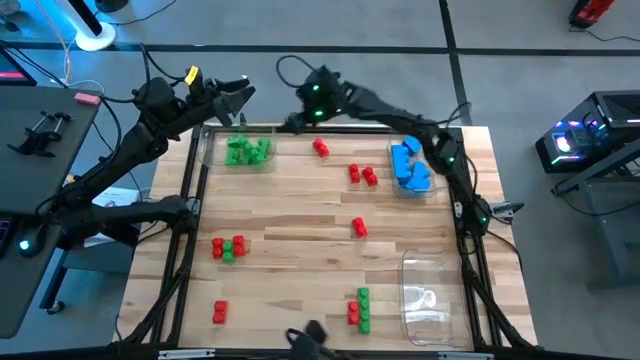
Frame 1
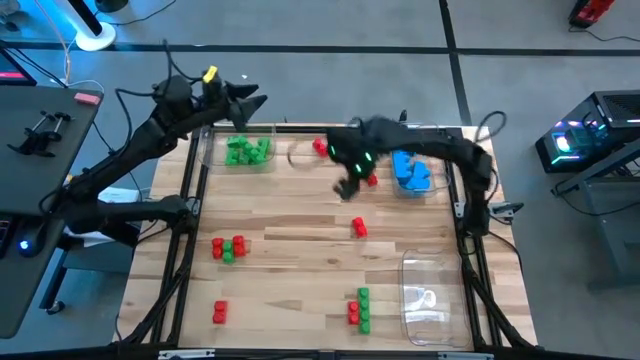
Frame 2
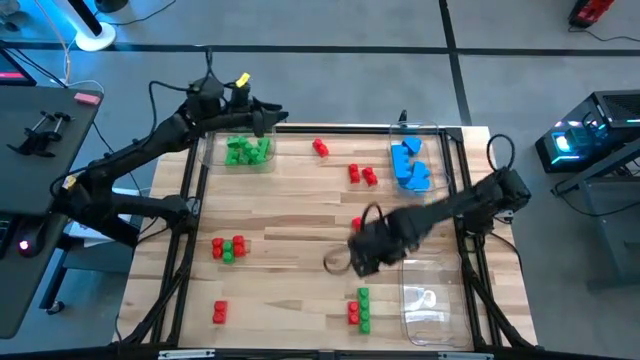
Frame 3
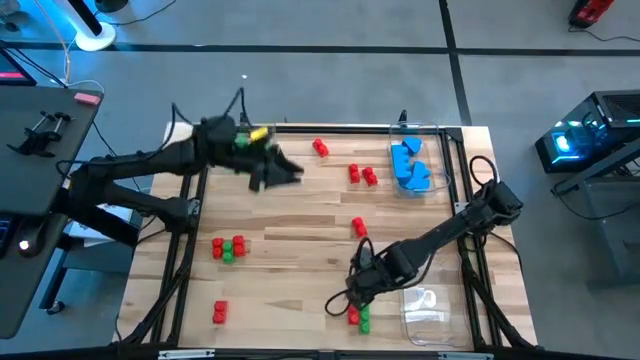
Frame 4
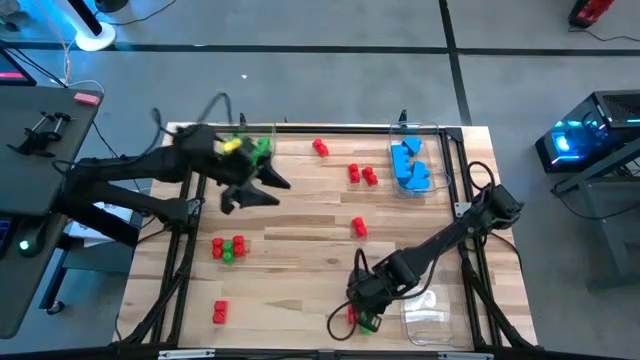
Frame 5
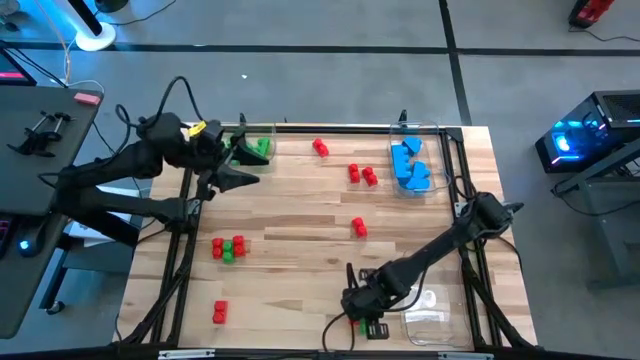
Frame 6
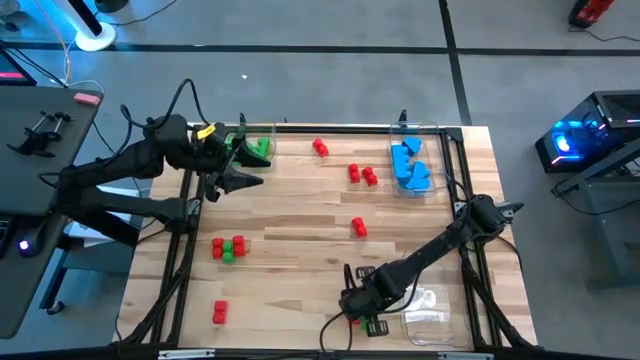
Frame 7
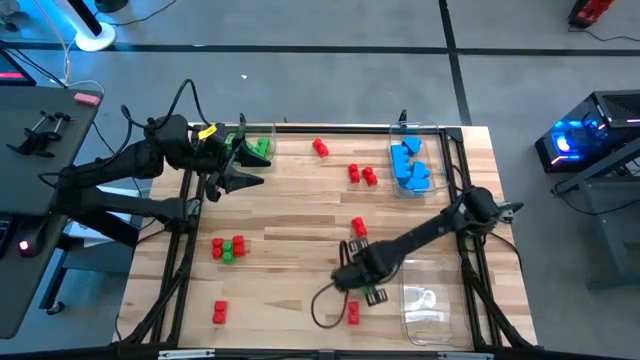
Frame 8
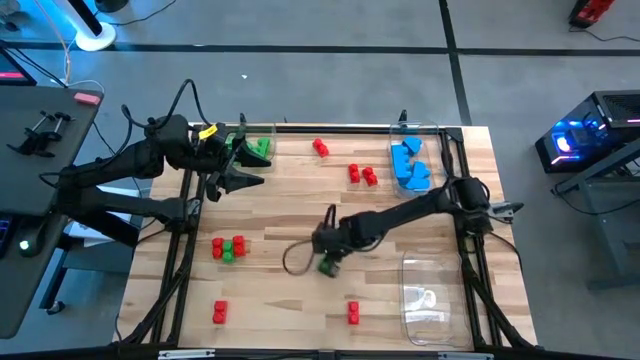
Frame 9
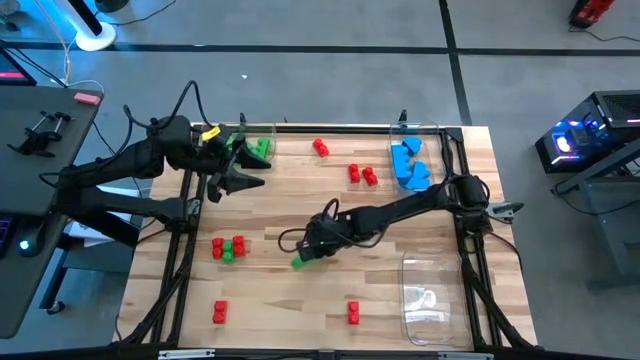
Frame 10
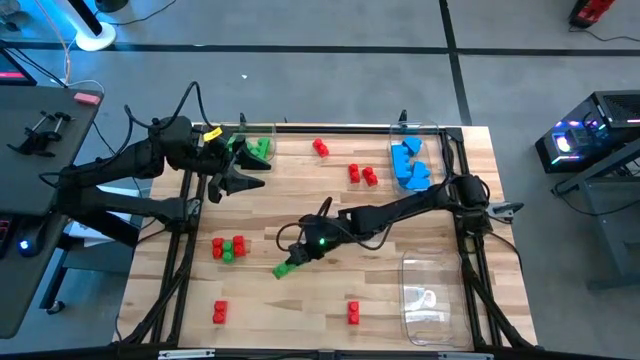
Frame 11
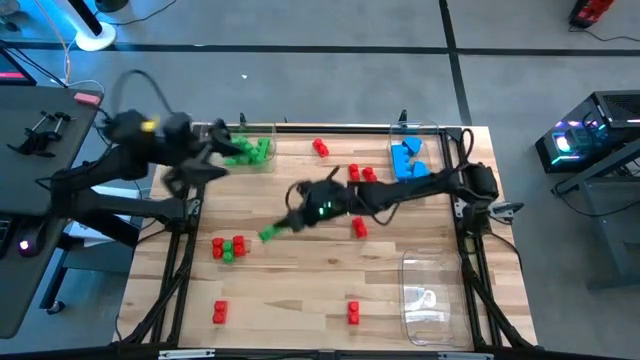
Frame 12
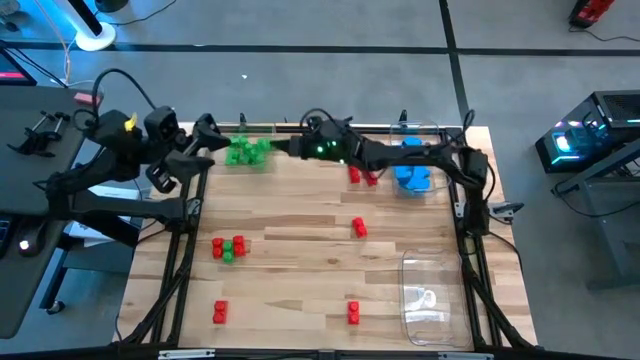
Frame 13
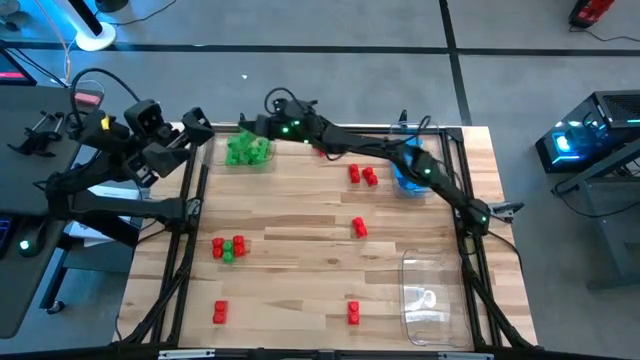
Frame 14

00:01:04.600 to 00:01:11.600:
Task: Sort blocks
Put the green game piece into the top left transparent bin

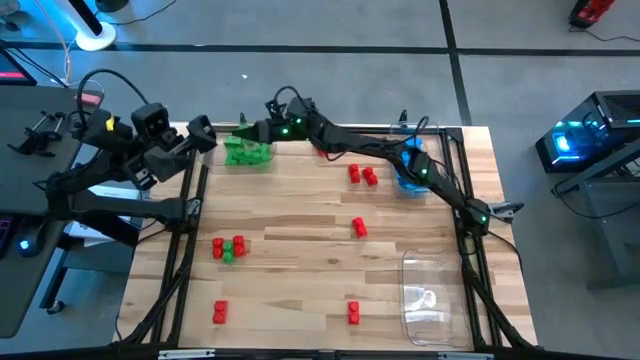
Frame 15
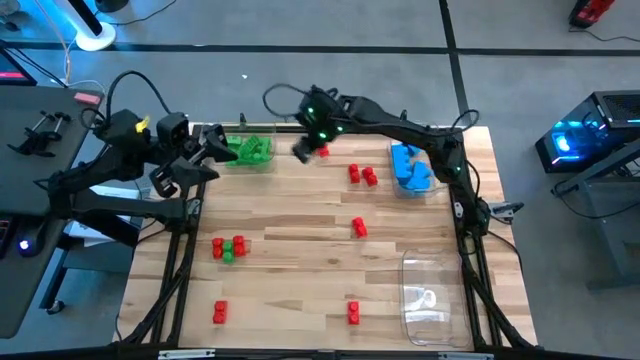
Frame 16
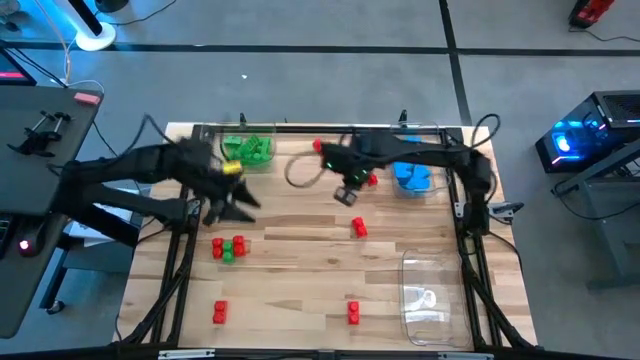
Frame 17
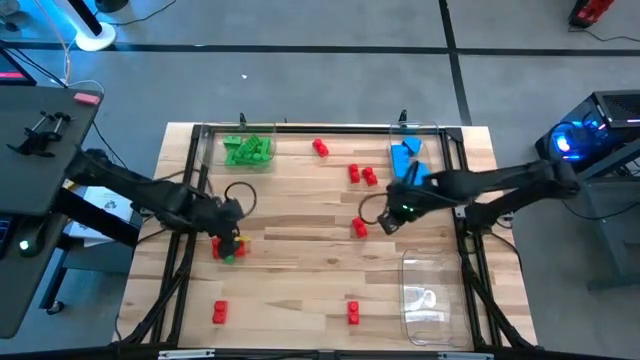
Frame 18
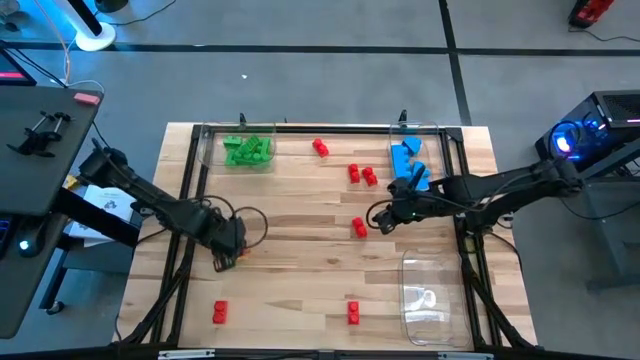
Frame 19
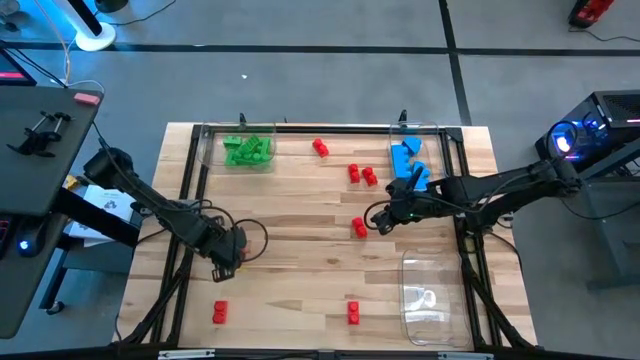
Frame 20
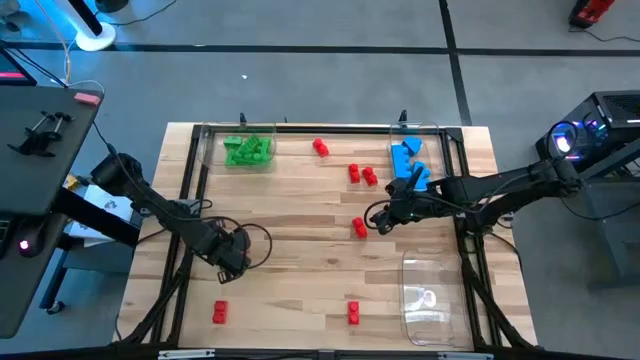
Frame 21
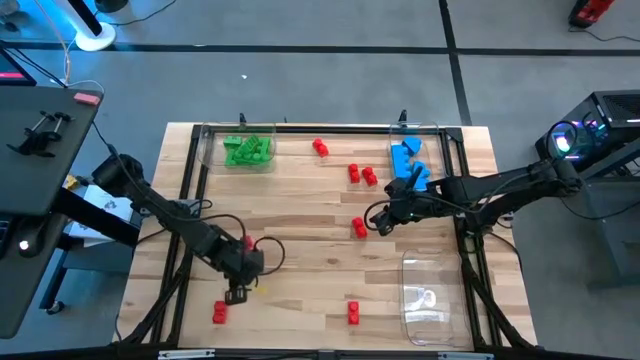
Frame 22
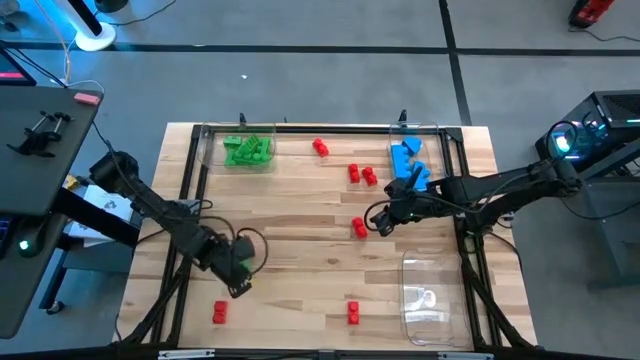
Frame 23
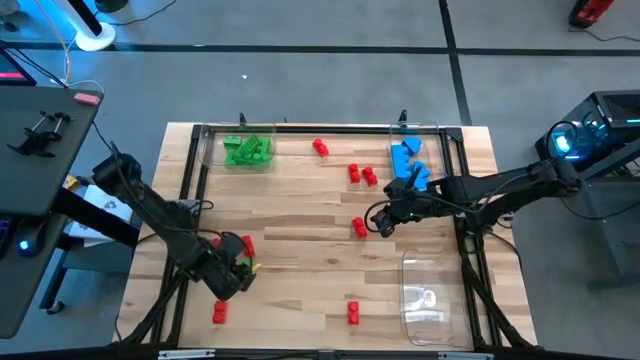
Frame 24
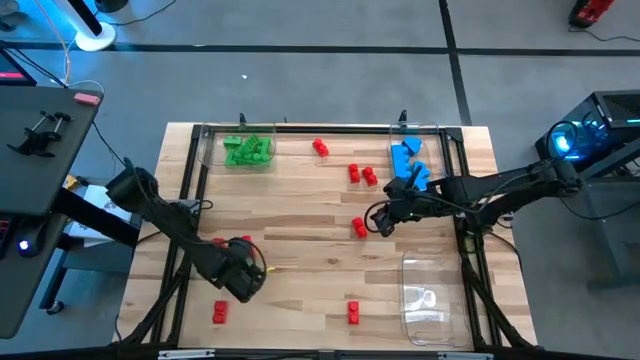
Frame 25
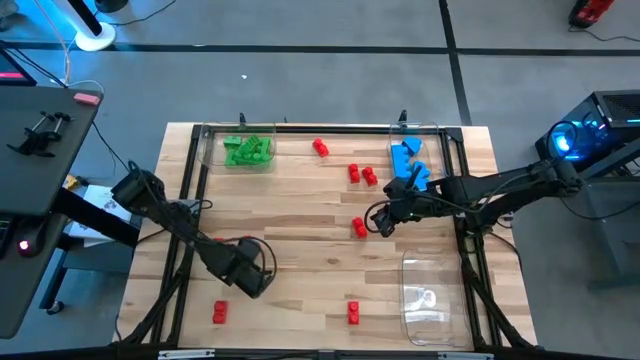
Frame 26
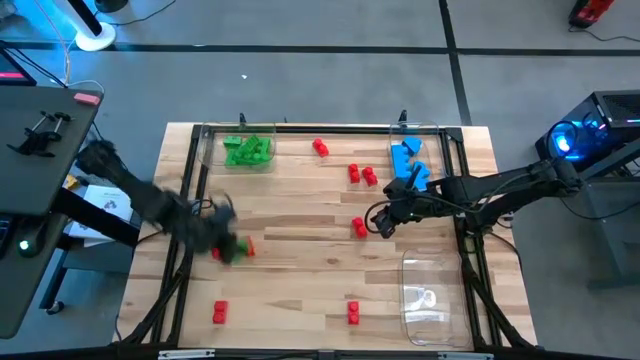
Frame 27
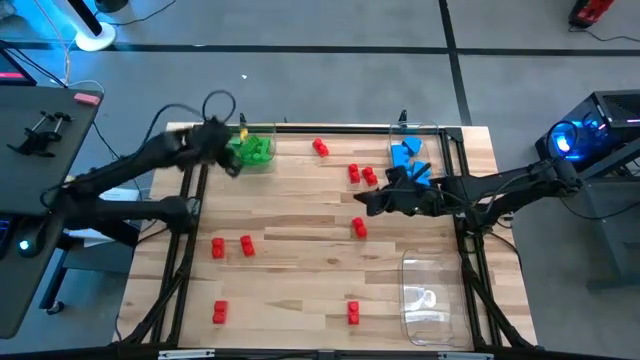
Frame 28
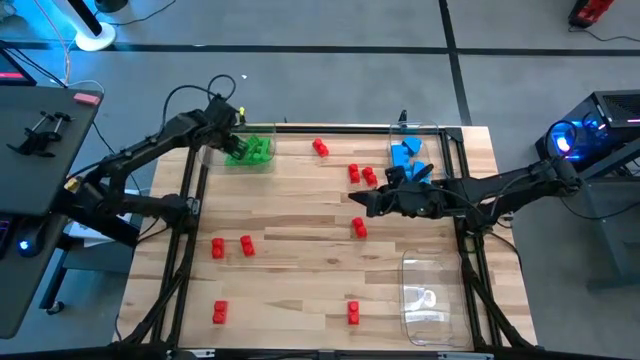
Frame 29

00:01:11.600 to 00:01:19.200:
Put the green game piece into the top left transparent bin

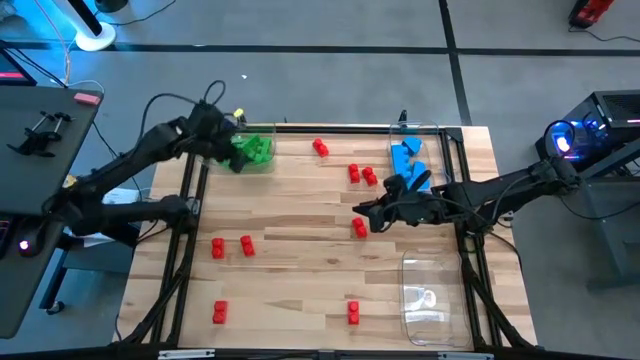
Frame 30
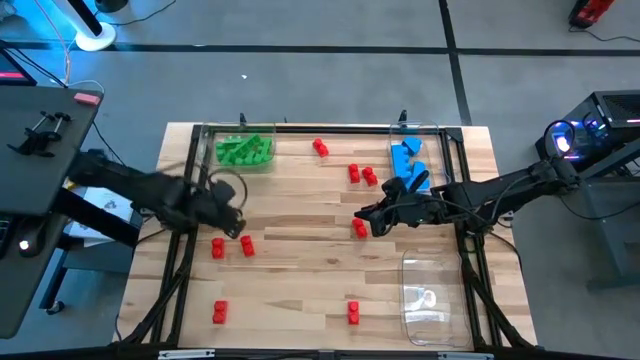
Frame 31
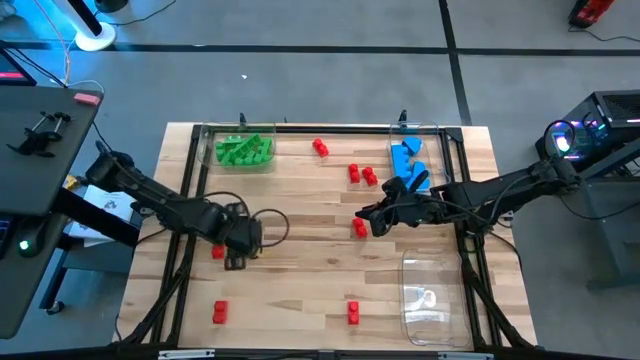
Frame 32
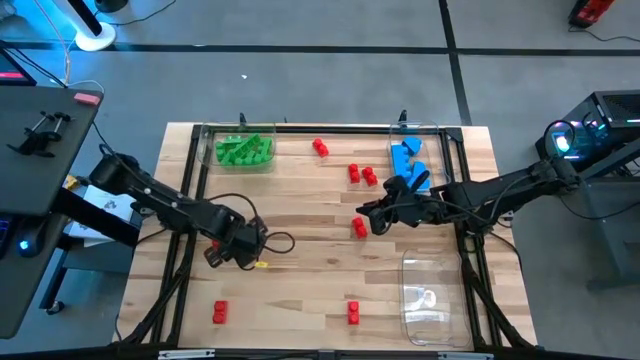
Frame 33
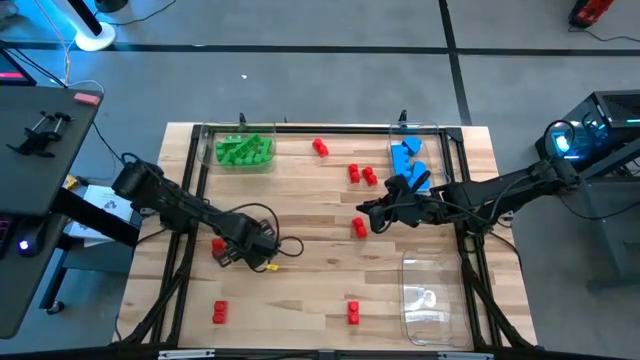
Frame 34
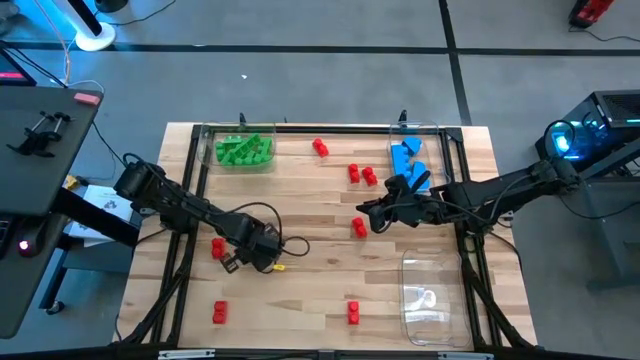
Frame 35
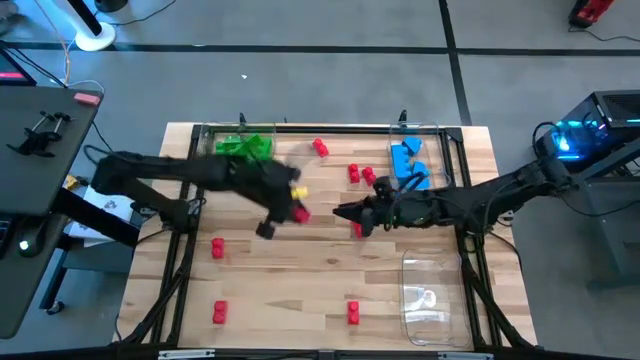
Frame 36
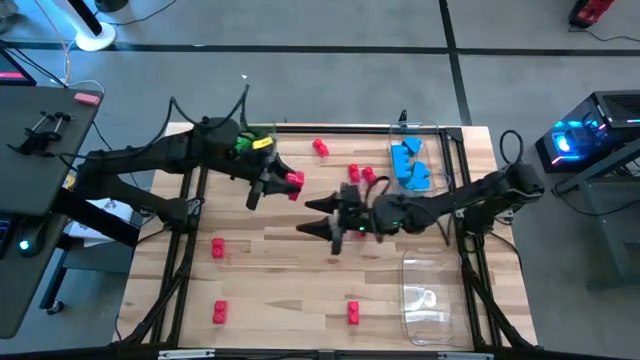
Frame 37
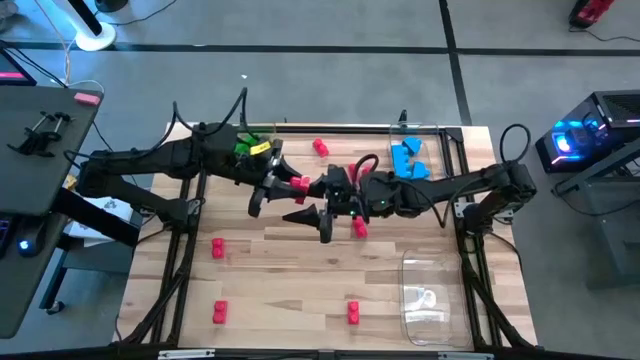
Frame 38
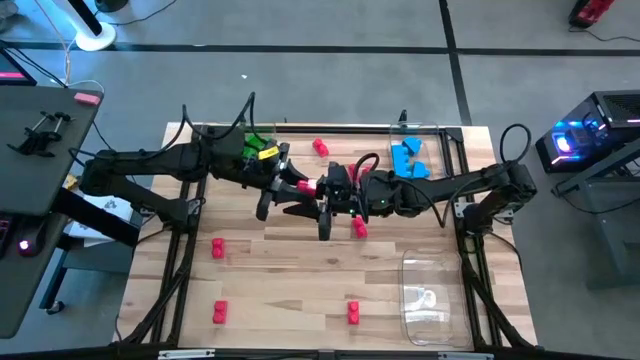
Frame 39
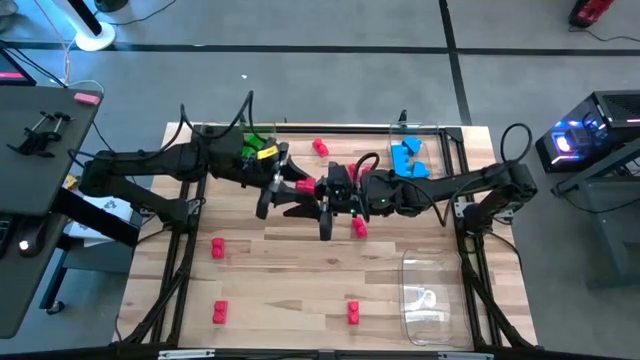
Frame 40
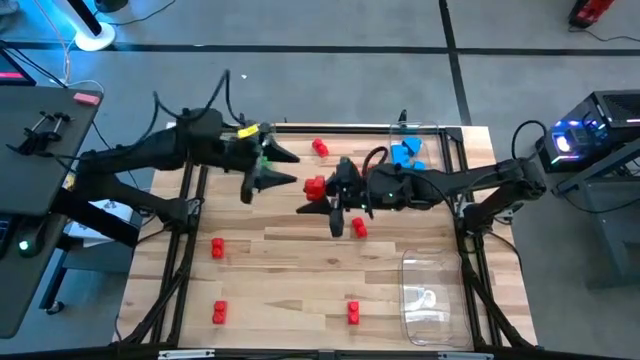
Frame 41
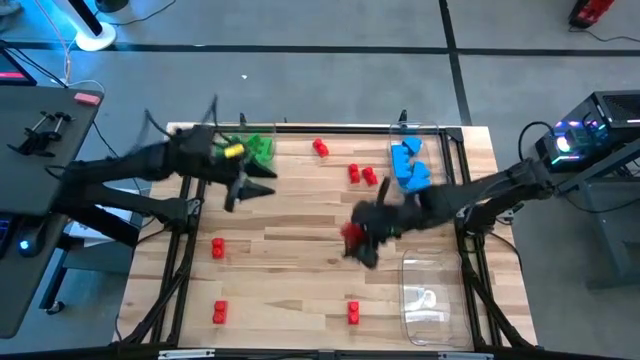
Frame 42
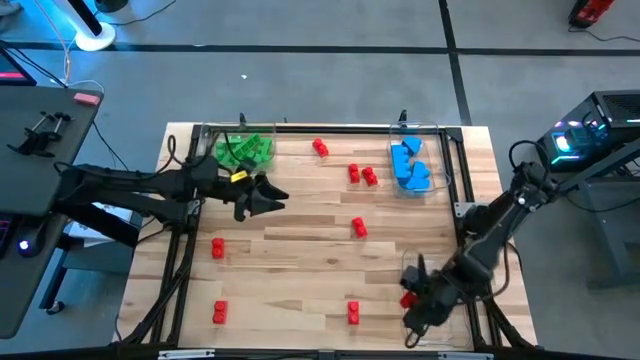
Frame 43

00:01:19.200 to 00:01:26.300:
Put the red game piece into the bottom transparent bin
